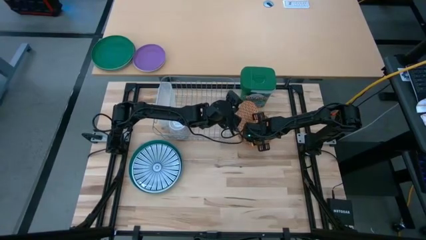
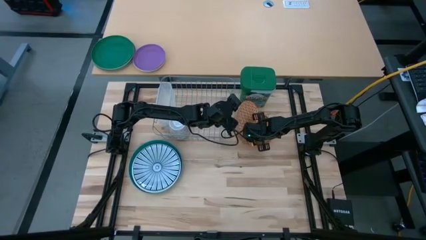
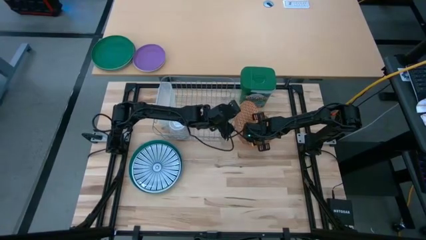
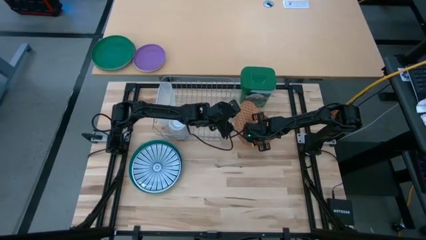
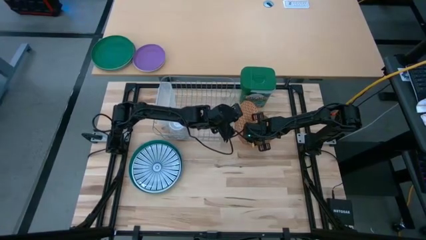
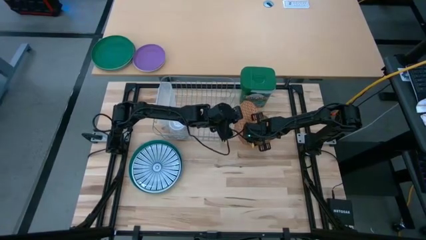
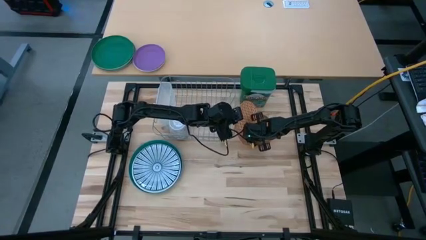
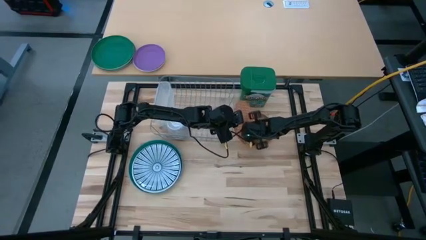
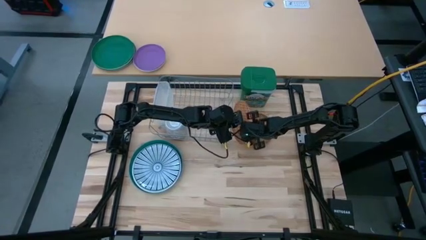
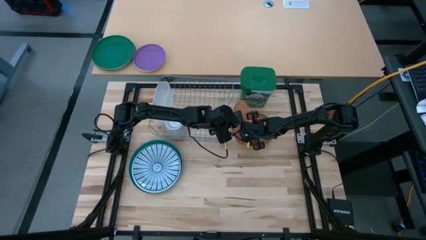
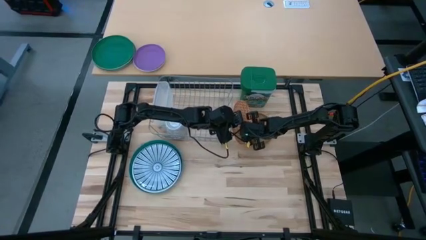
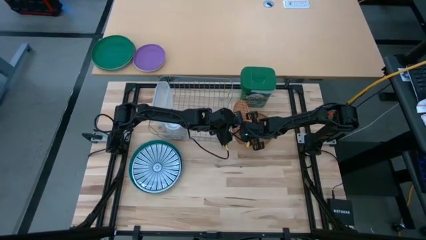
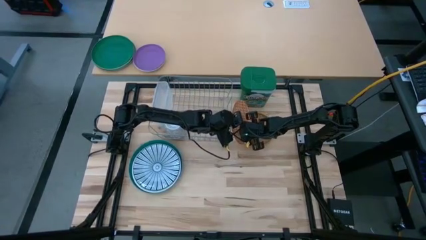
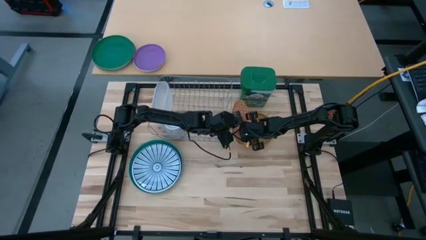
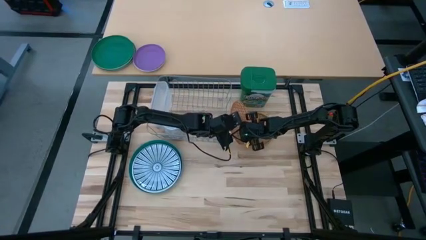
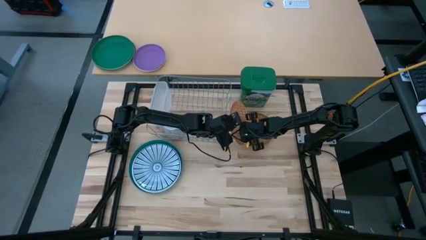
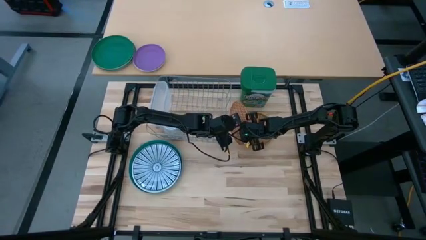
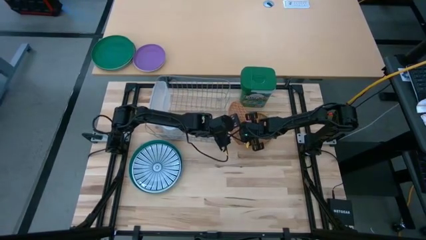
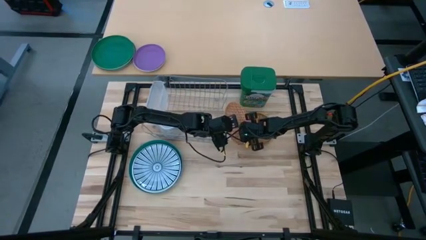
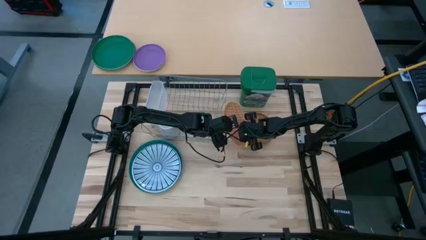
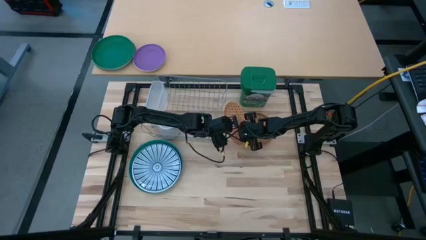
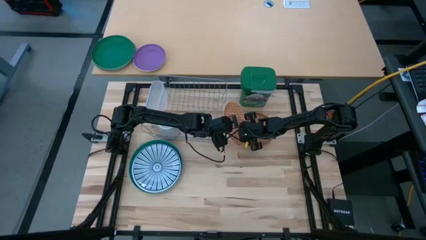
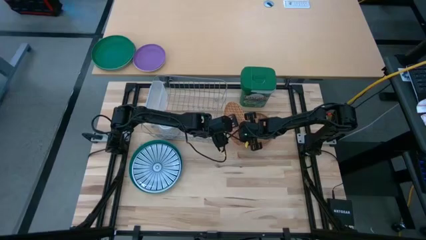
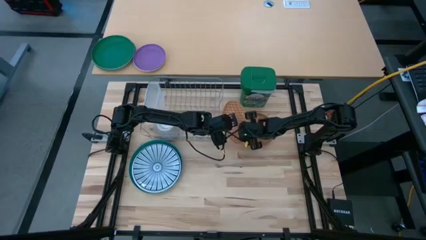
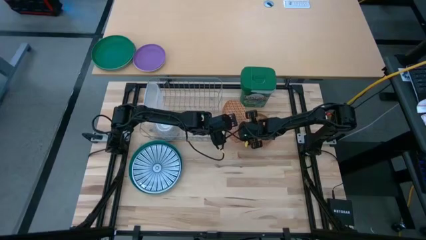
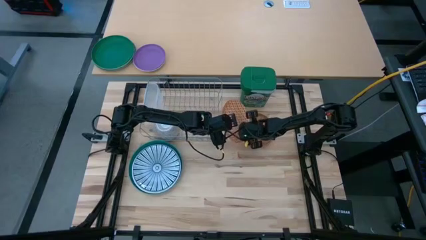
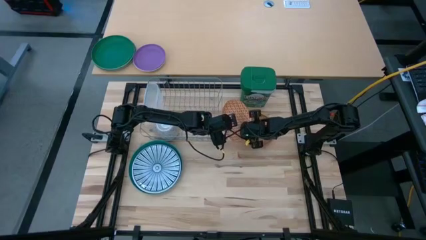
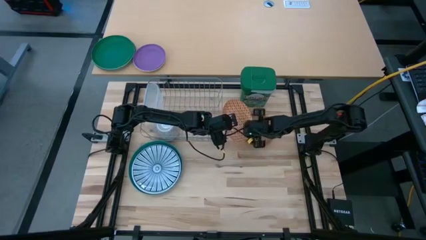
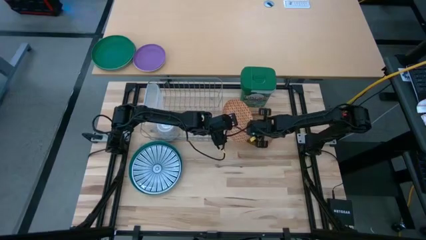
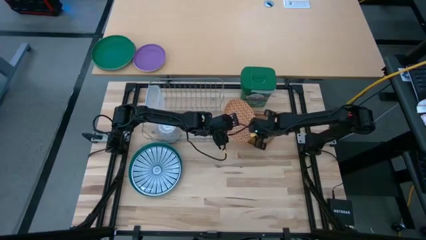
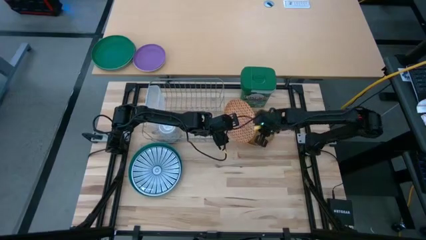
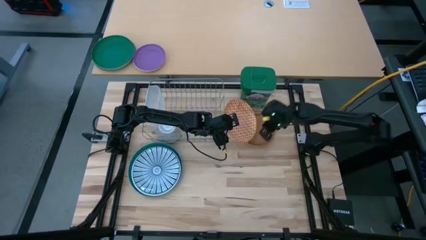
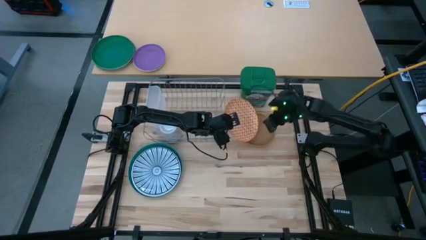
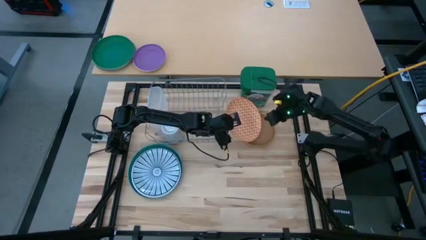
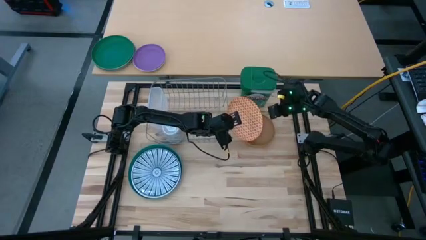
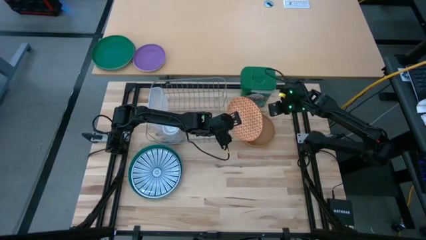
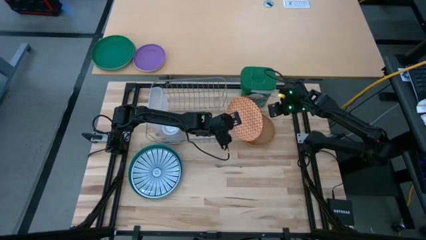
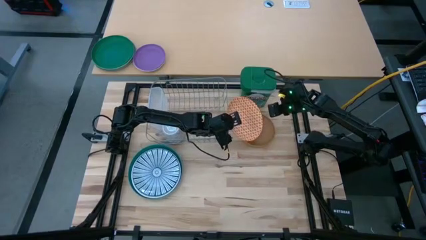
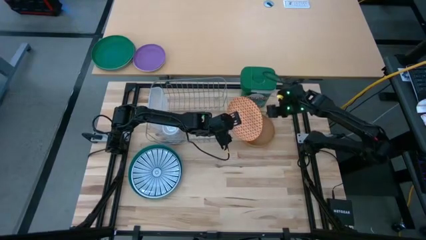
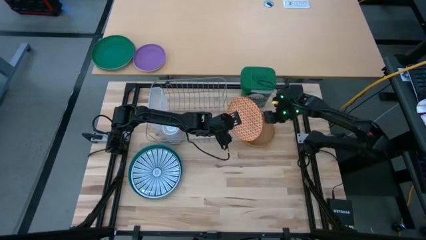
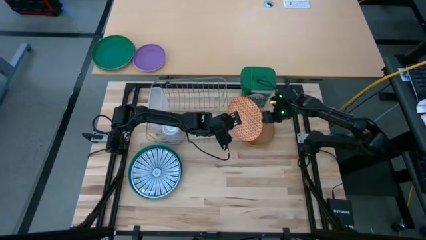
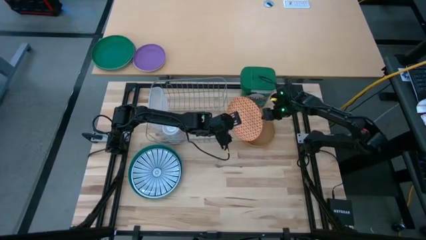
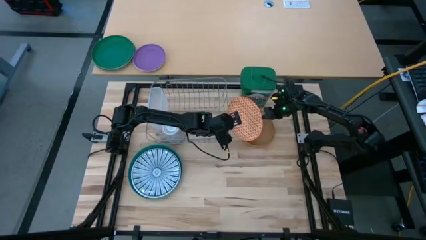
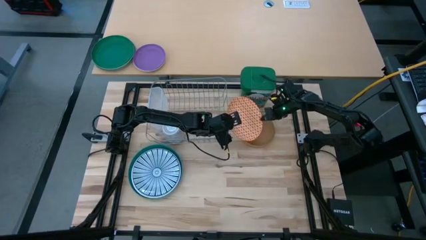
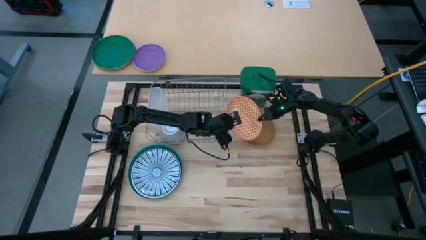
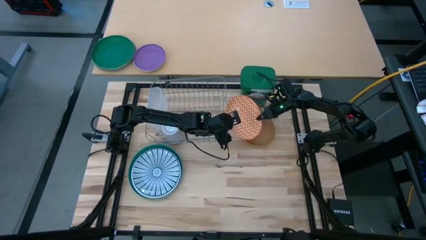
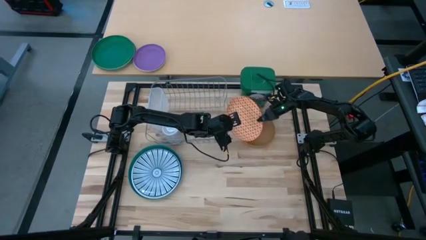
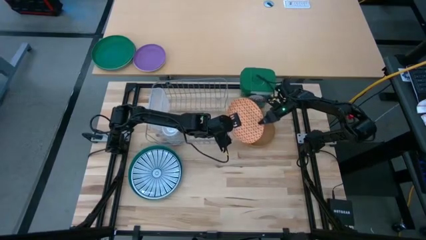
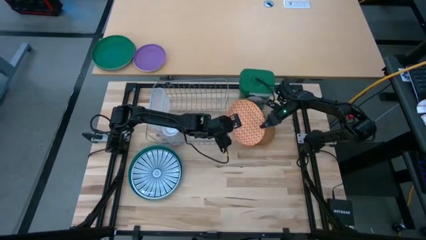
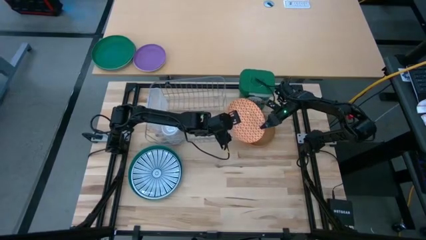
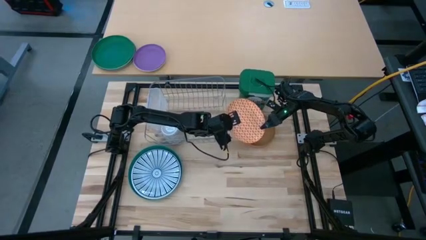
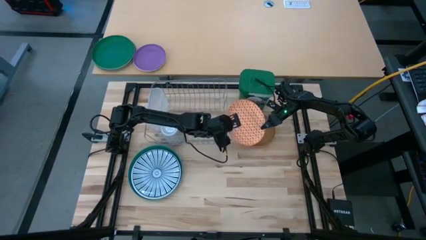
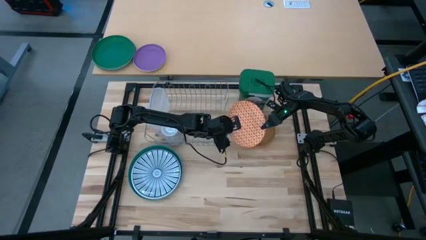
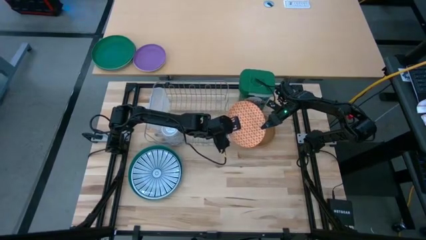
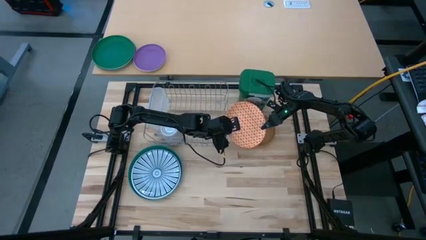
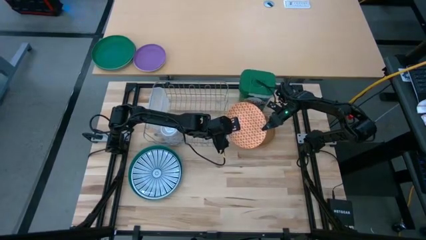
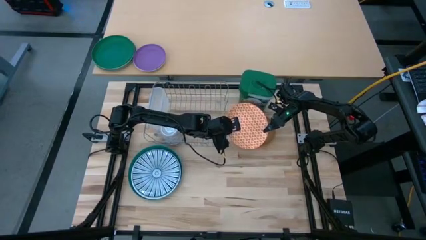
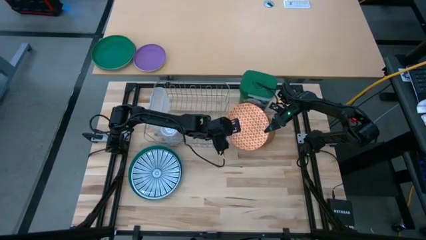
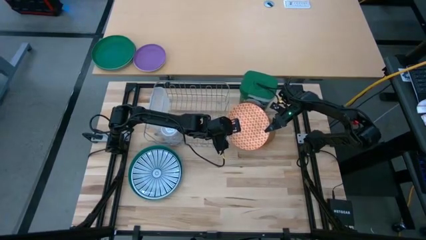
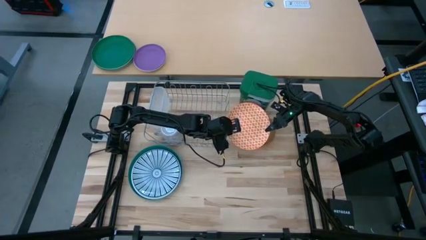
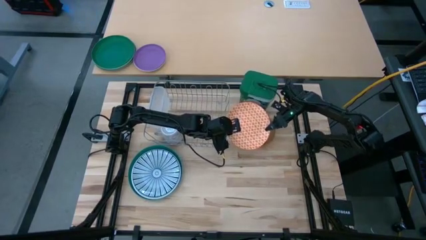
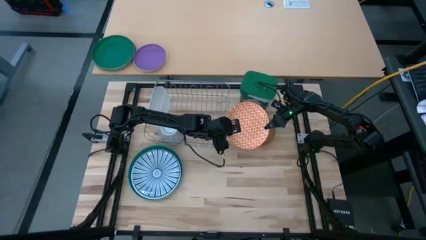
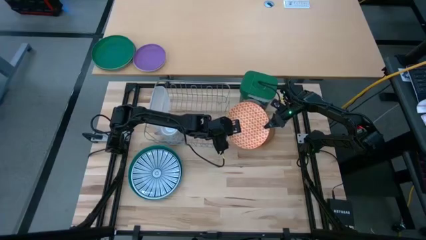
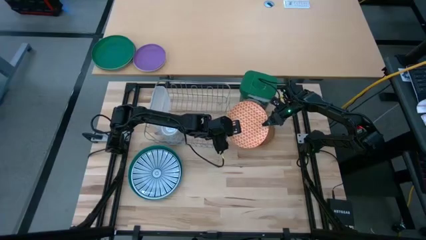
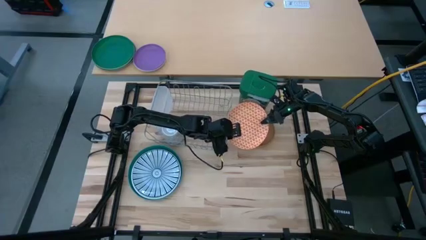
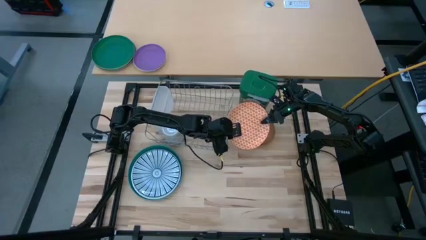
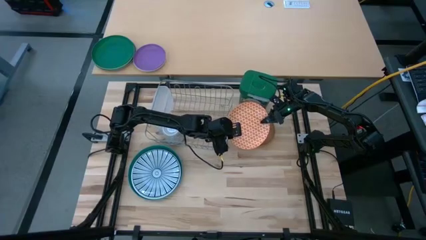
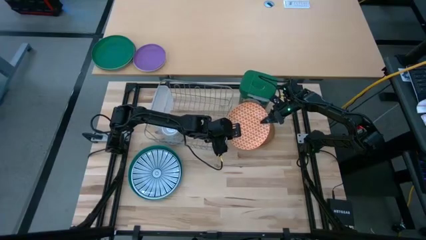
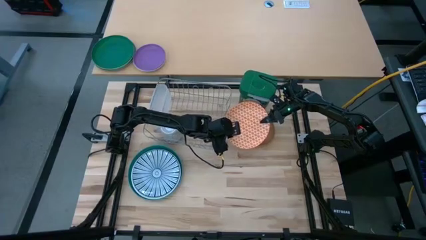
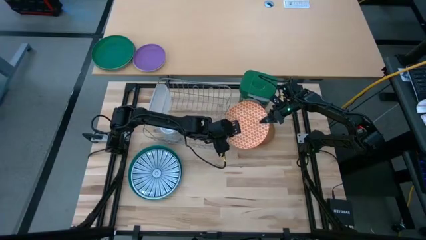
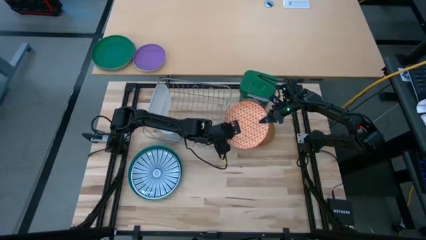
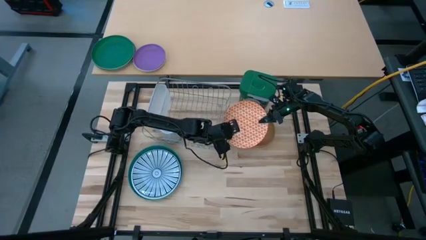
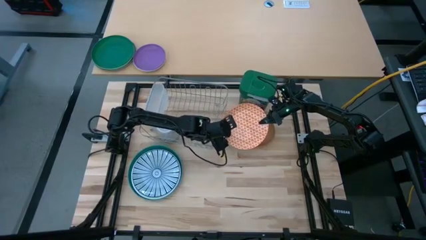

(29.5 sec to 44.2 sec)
Task: Sort dishes
Put the orange plate in the dish rack

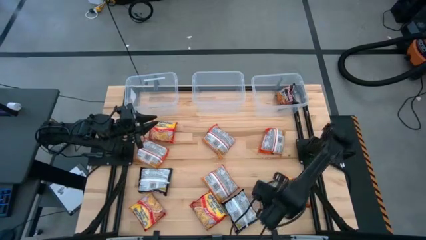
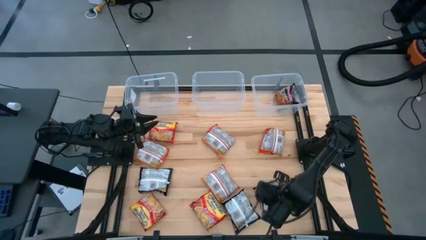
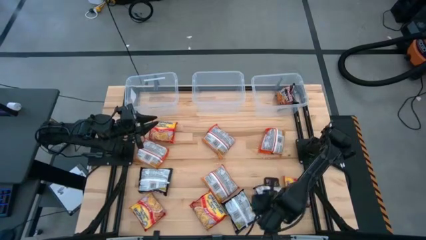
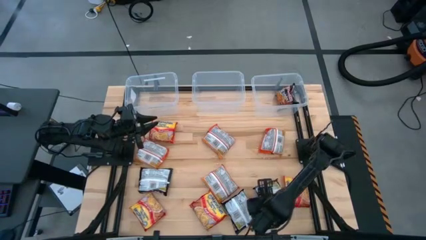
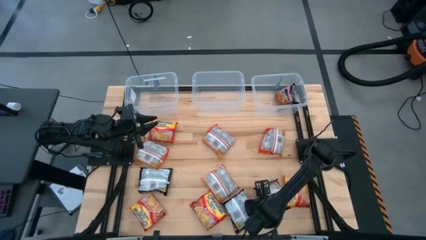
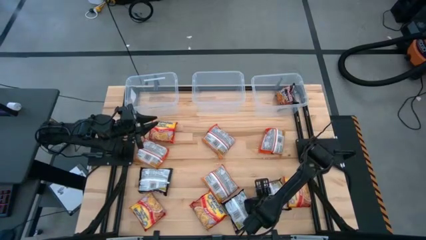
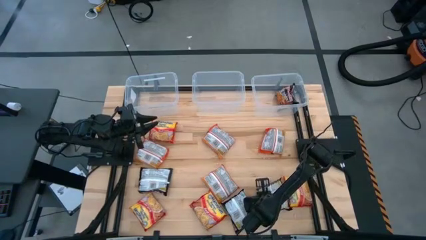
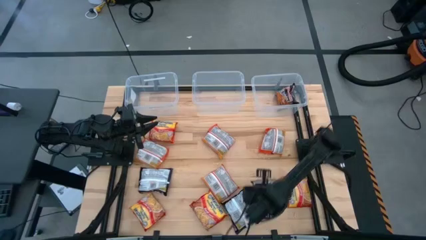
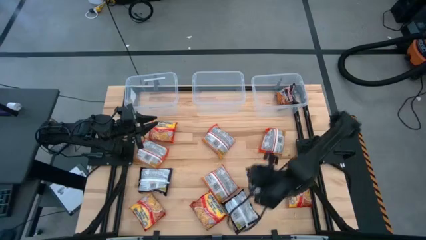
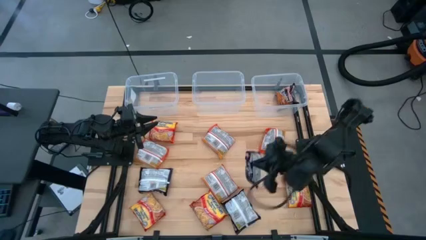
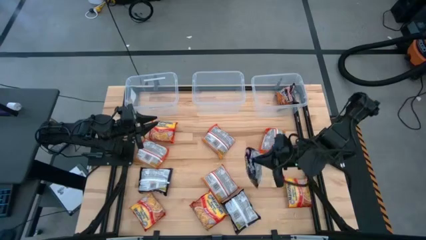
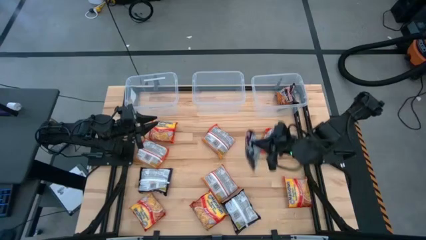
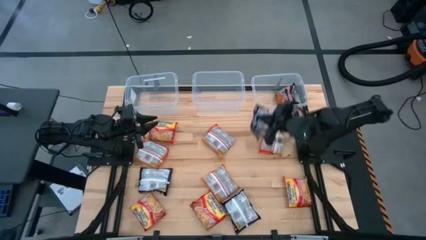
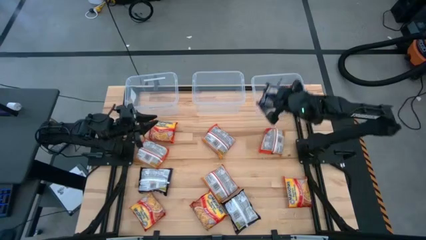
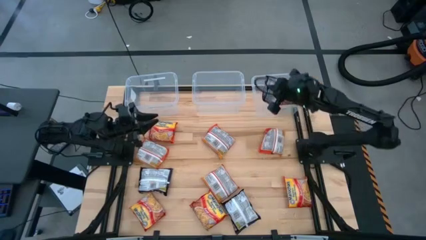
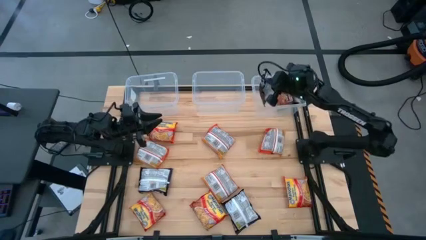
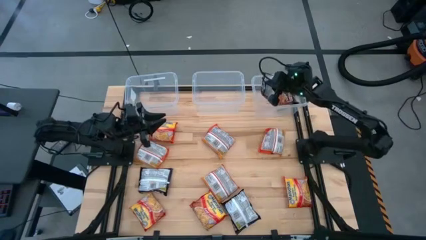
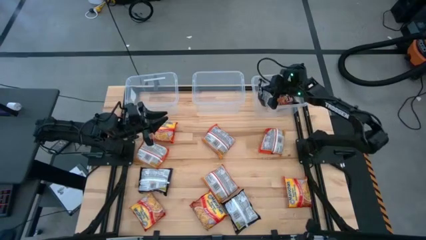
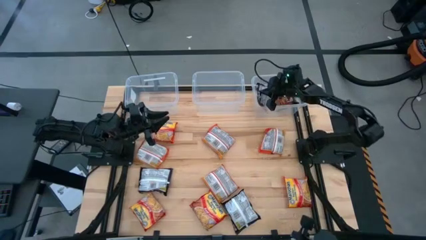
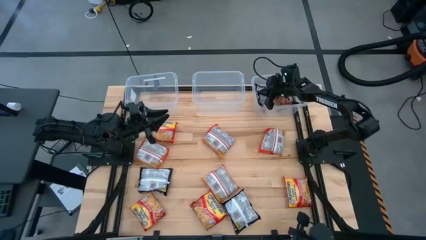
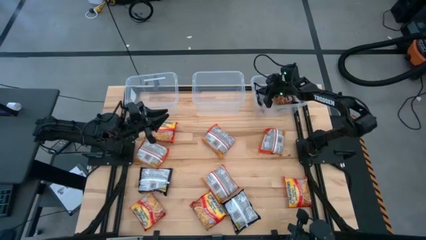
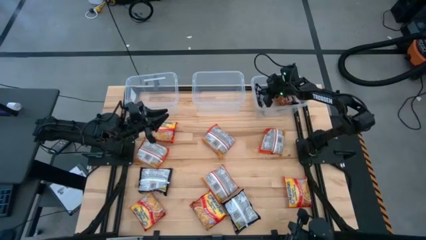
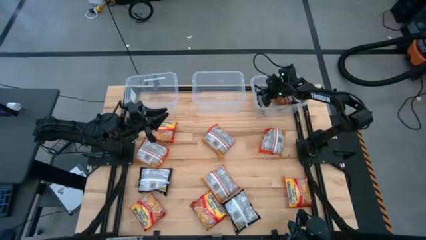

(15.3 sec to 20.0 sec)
Task: Sort Maruchan noodles
Put the black noodle pack into the top right transparent bin
